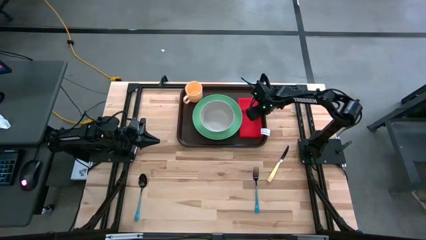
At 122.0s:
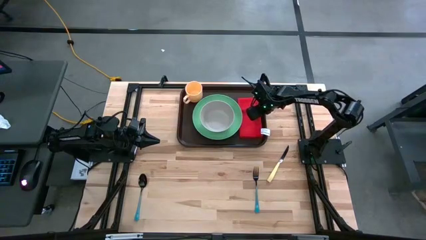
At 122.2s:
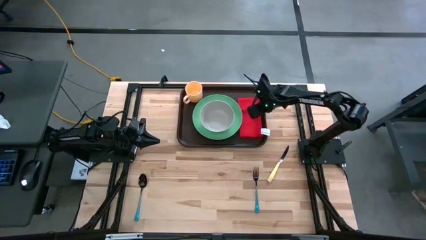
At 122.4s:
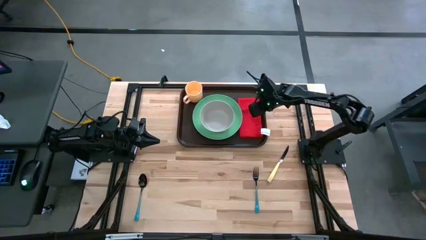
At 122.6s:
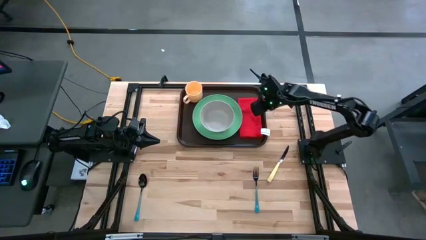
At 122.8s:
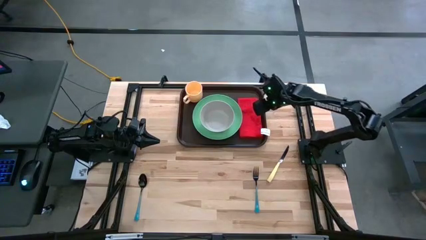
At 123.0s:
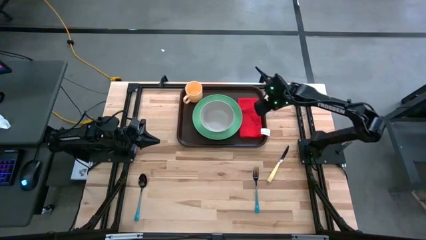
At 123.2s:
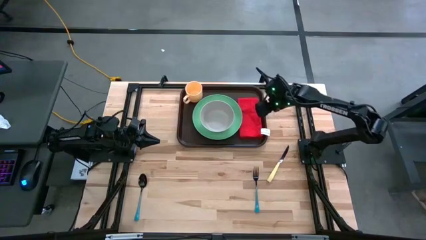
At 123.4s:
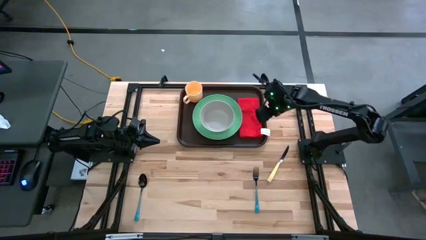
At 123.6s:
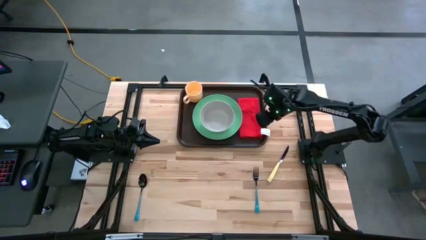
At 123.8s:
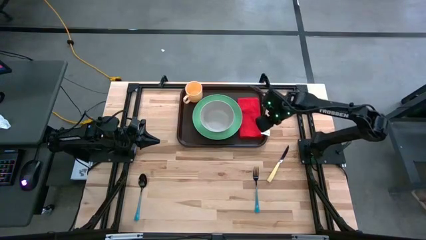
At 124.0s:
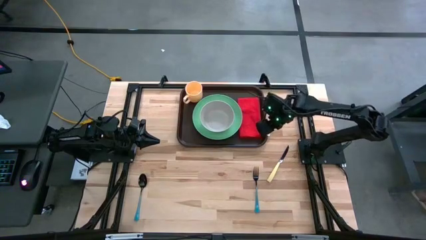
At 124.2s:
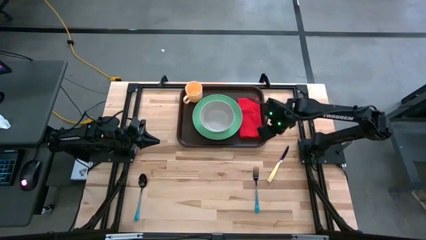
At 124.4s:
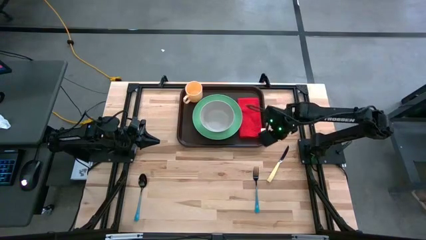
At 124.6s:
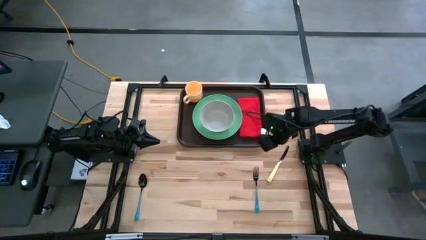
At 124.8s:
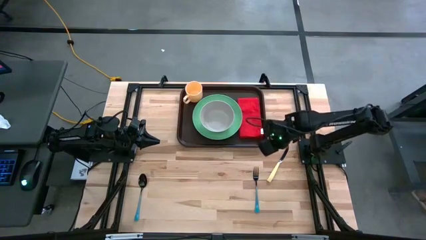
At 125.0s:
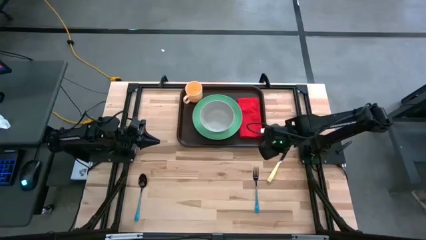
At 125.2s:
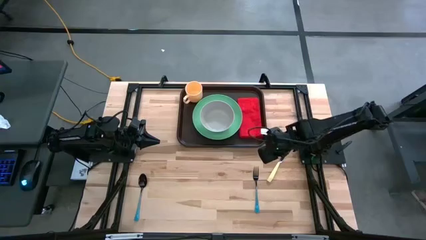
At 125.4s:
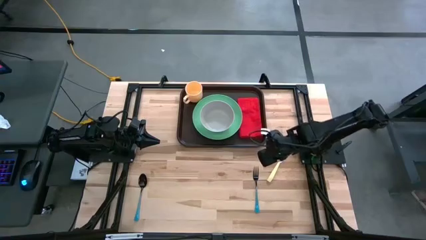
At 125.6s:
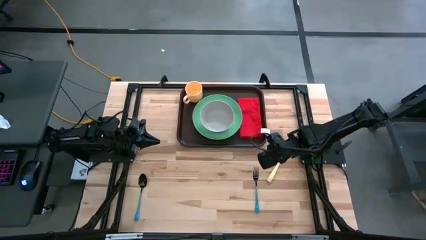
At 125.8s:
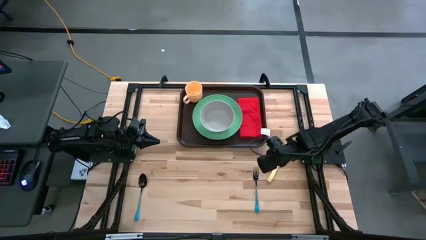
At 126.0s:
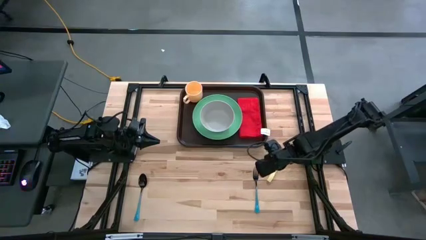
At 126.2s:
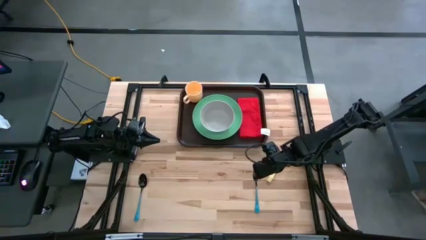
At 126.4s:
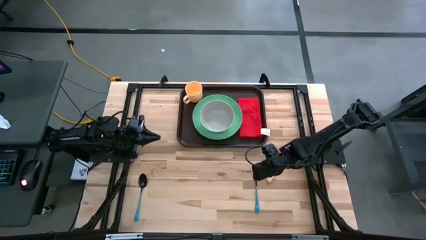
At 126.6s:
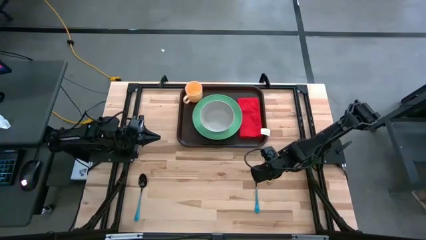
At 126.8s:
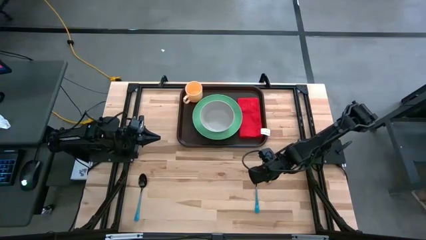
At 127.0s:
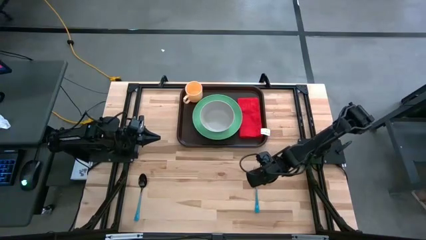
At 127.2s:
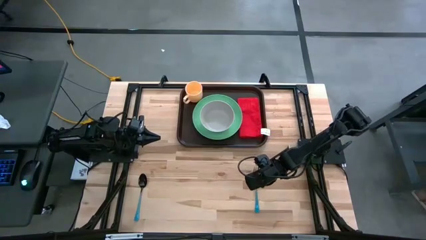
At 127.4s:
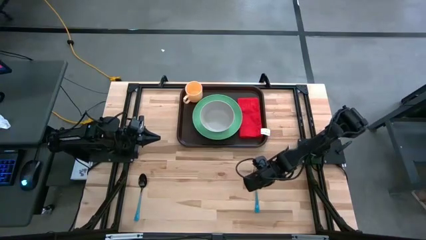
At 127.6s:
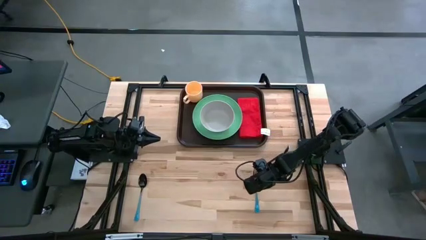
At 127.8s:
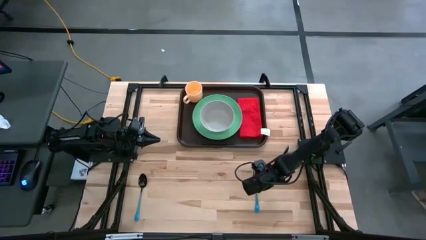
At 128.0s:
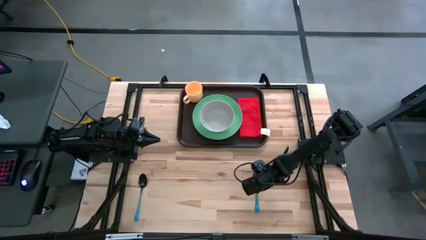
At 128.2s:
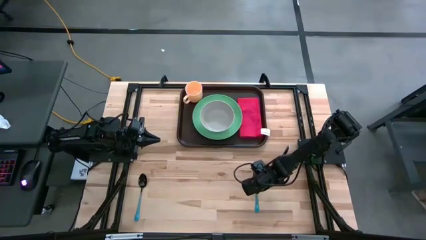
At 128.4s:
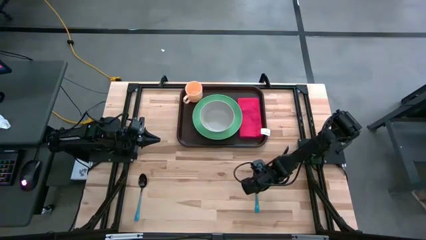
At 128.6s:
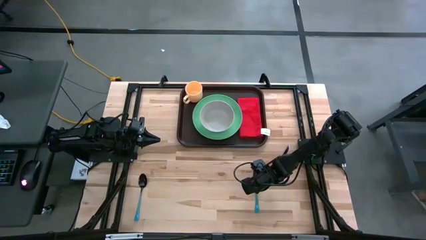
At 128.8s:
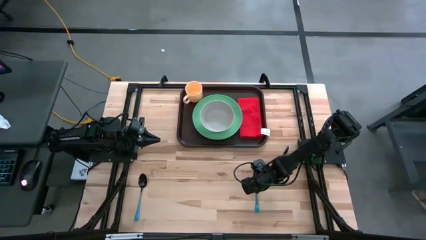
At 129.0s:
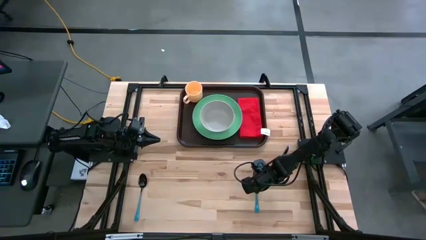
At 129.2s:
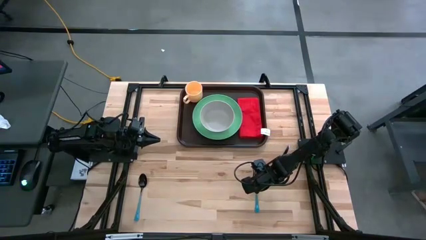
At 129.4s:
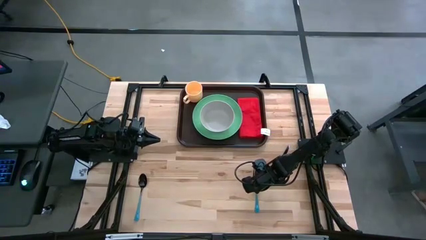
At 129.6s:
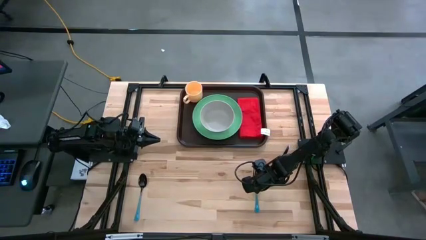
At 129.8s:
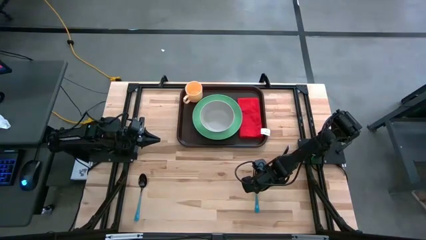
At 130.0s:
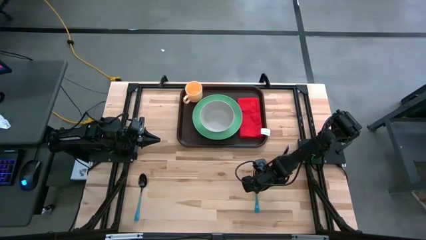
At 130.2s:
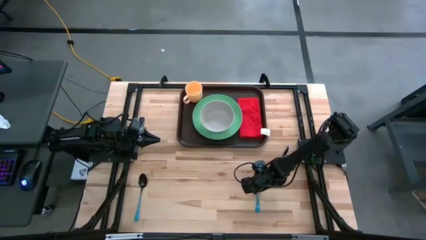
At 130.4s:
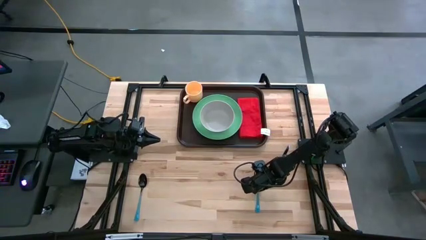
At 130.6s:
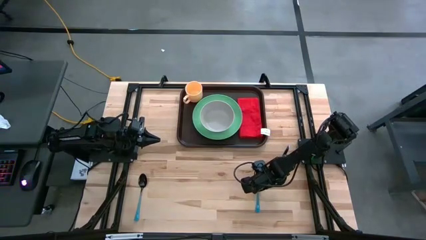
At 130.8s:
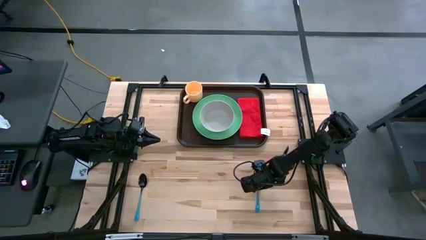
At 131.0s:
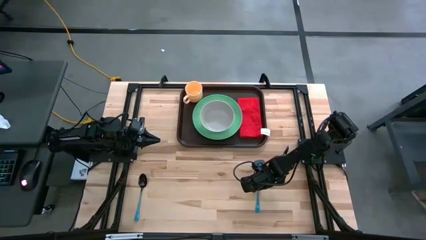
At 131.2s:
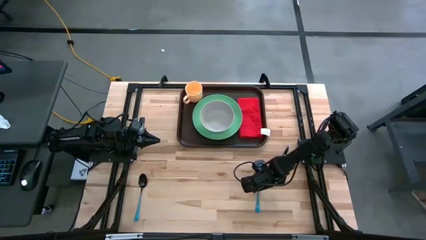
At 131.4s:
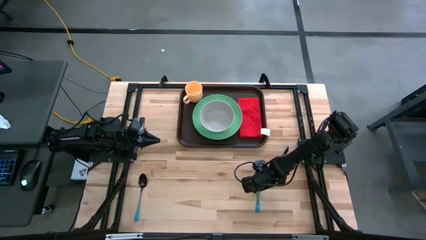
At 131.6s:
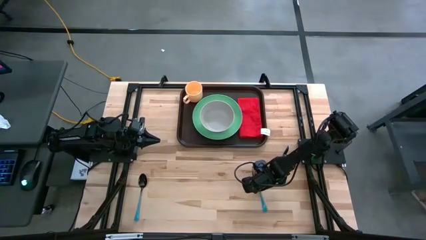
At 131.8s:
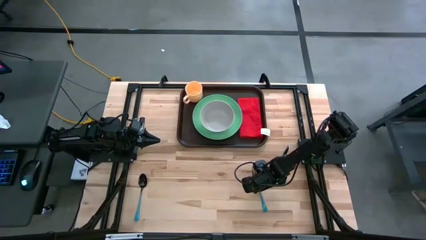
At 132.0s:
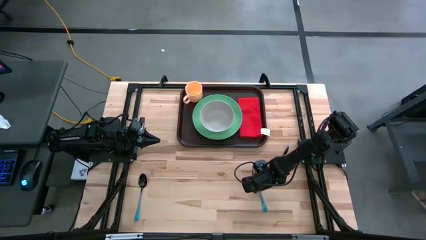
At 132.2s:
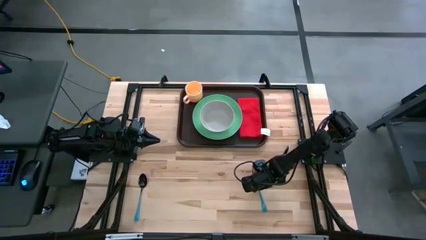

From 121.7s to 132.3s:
Task: Set up tray
Put the blue fork on top of the red table napkin to the right of the green plate

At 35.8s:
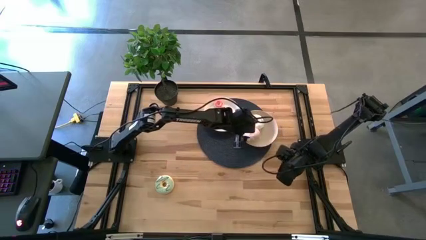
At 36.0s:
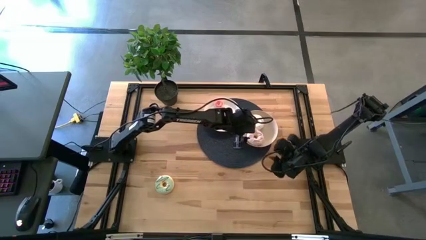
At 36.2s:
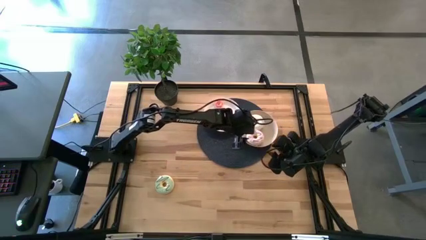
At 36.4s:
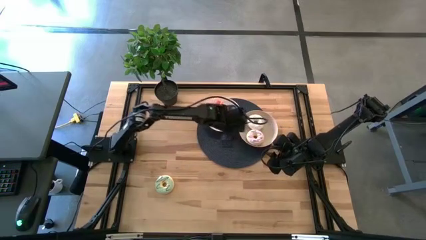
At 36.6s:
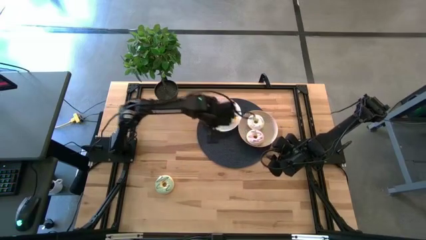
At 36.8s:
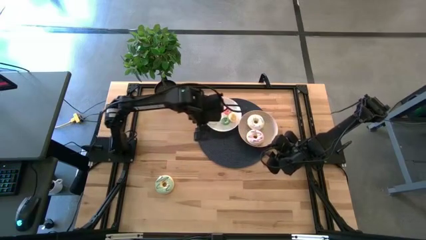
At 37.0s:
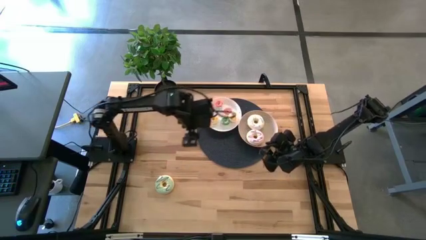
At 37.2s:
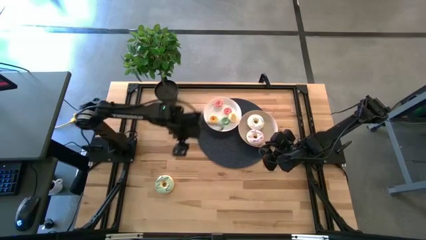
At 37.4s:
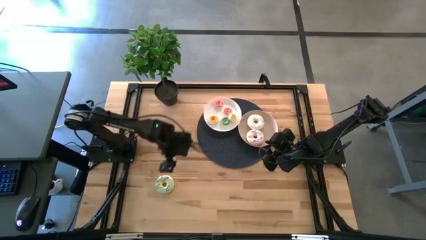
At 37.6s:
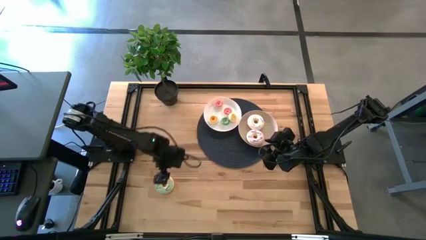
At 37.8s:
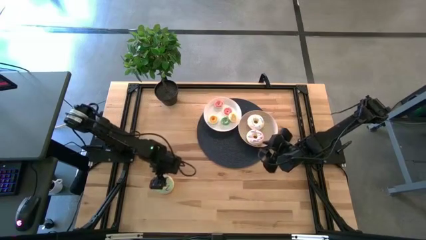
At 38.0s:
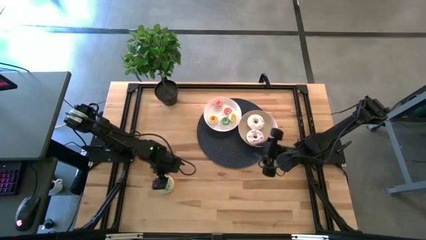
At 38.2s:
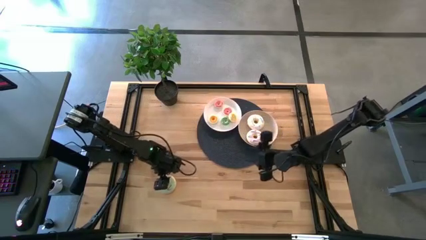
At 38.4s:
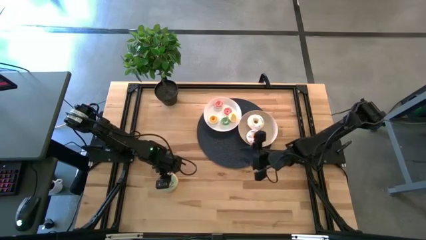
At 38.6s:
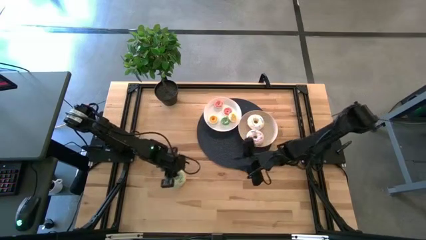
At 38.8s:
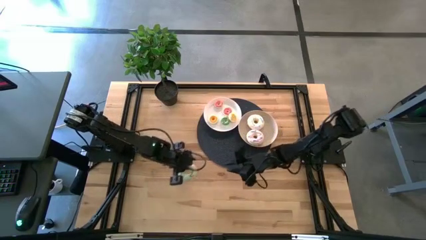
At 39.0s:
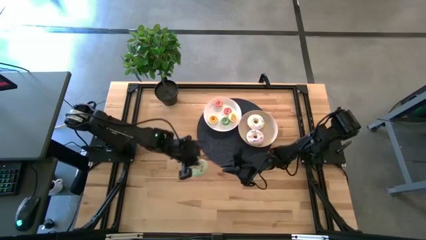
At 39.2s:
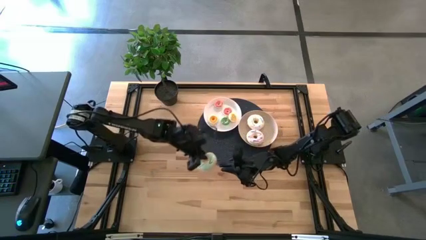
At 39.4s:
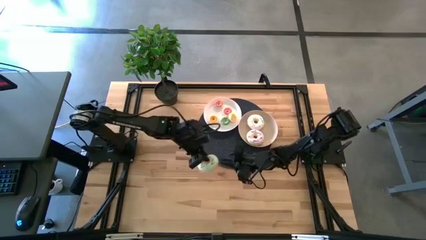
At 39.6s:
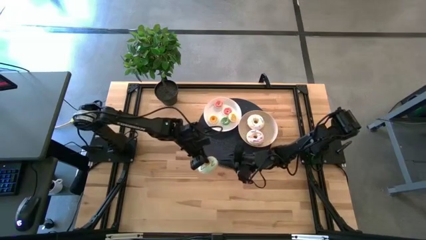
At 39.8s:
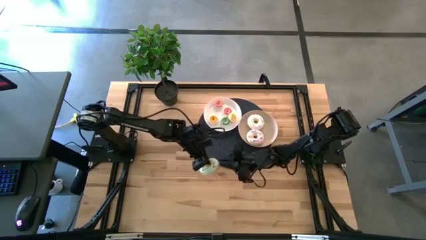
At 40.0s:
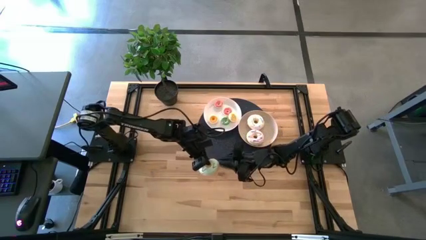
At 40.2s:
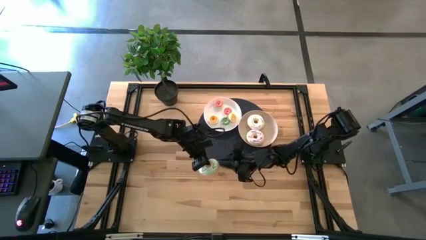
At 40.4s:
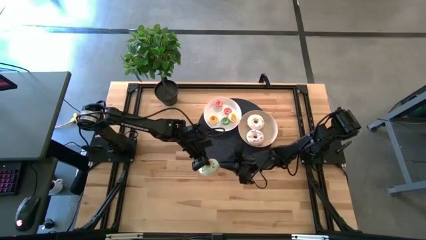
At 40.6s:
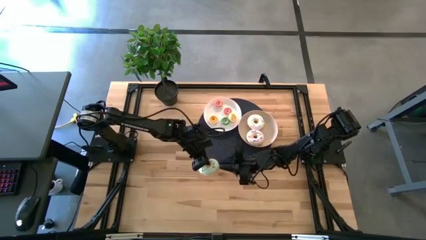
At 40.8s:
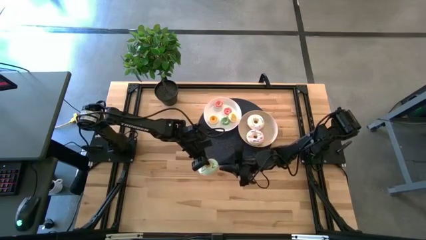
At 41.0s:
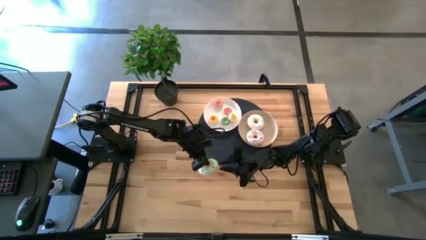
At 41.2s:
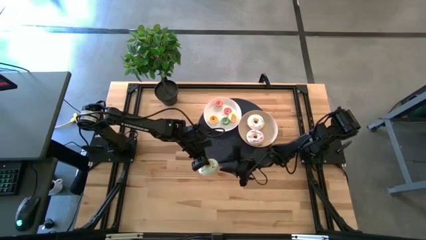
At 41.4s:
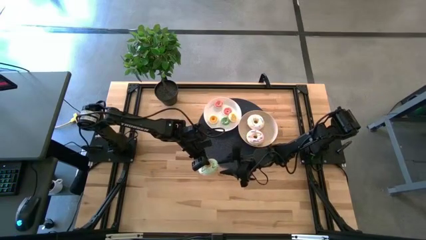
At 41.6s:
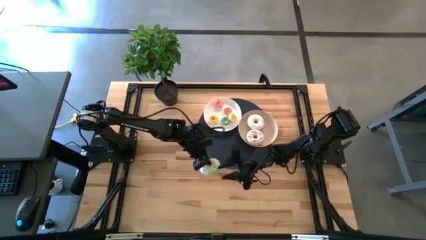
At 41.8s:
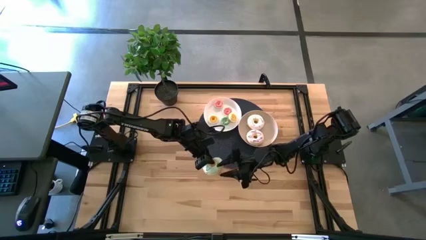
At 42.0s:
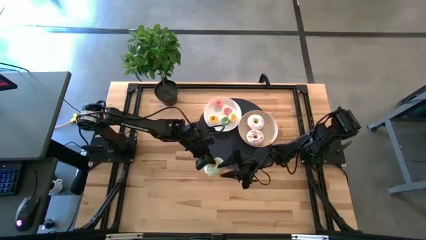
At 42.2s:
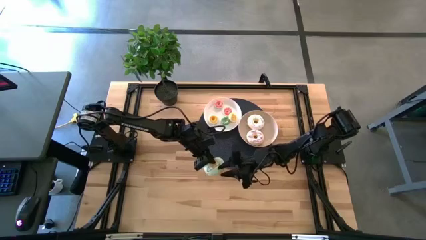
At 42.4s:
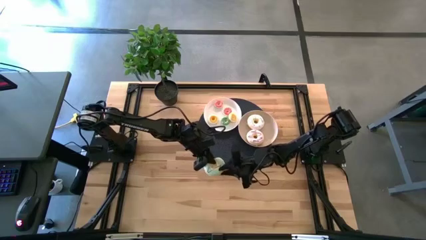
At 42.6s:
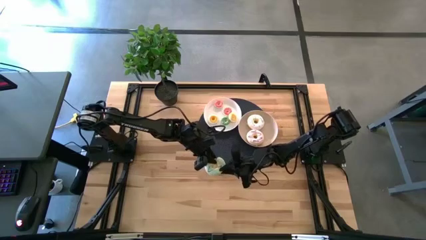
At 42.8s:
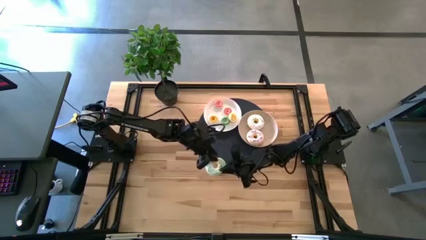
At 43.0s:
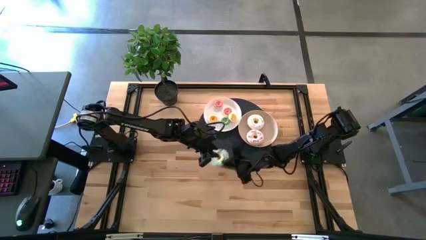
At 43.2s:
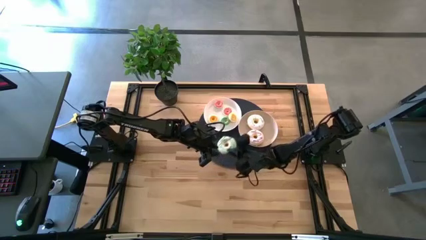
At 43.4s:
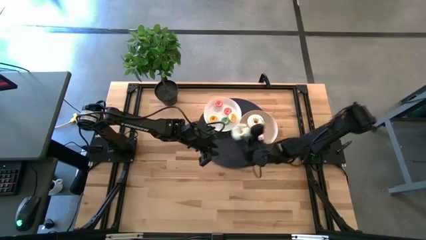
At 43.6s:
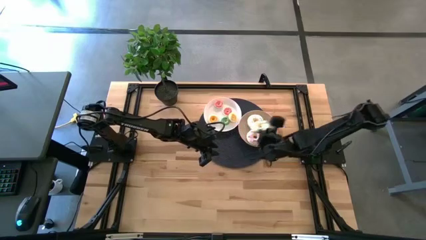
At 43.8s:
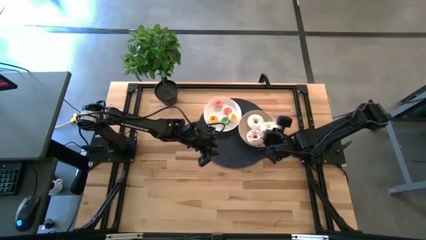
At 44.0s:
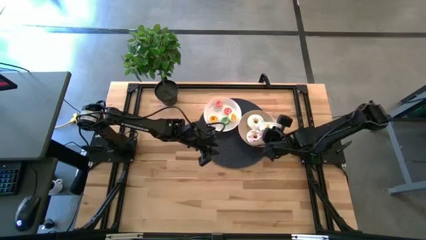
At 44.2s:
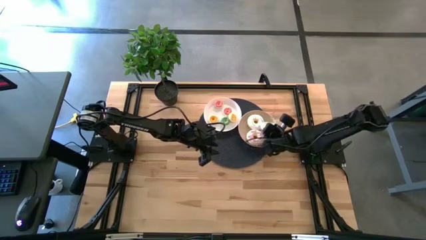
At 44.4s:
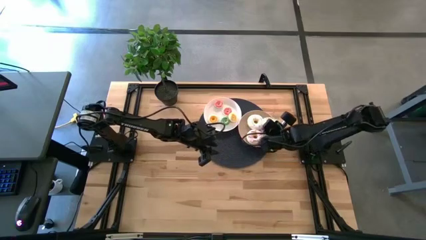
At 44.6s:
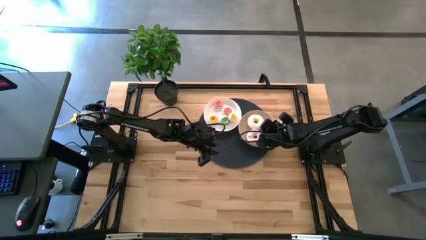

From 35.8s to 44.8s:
Task: Pick & Place donuts
Put the large blue donut on the gray plate
